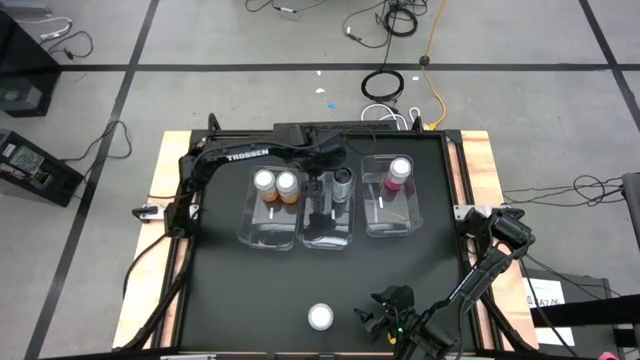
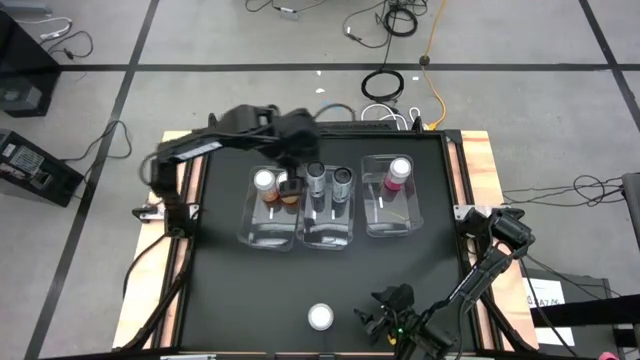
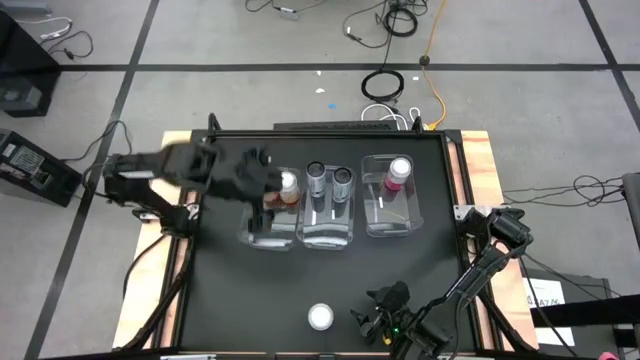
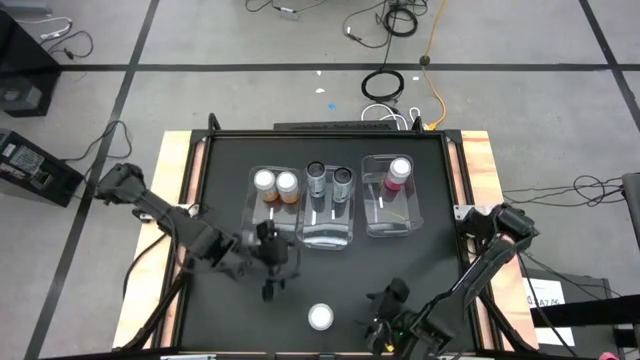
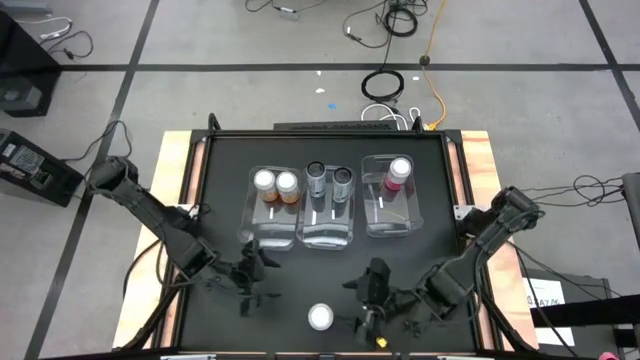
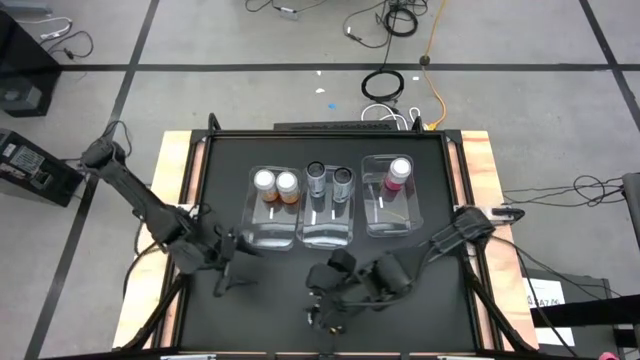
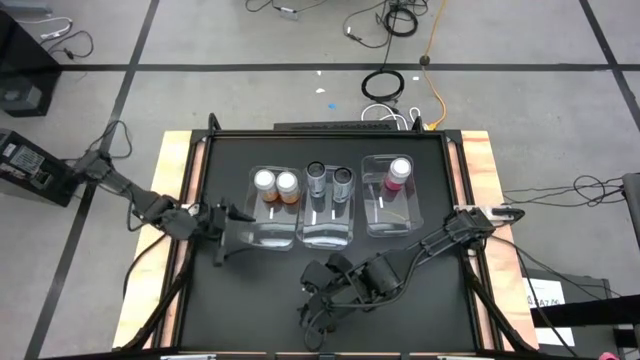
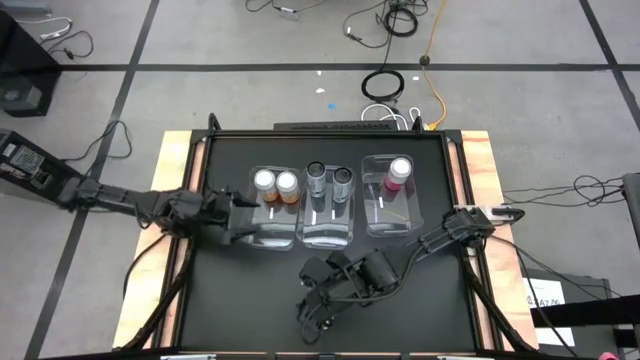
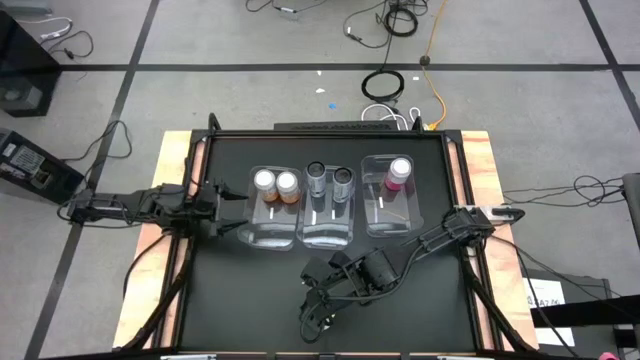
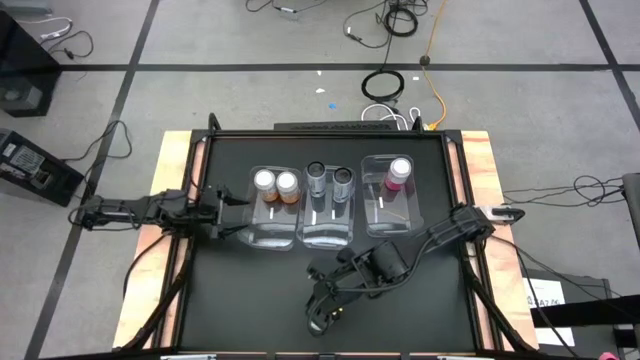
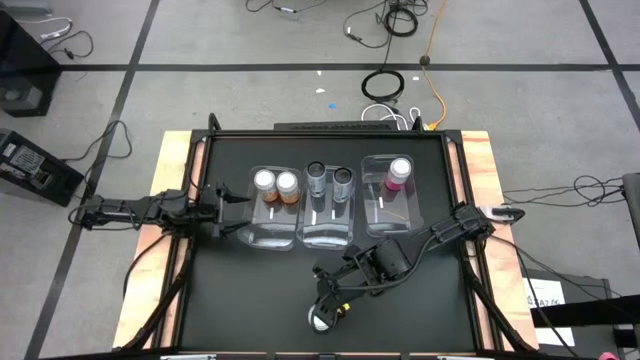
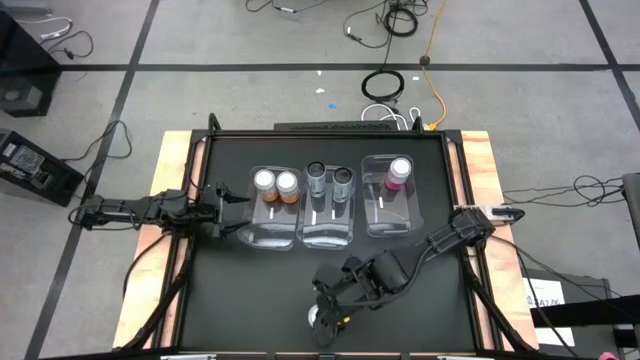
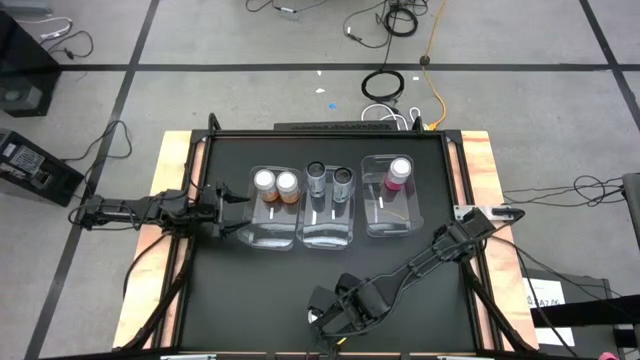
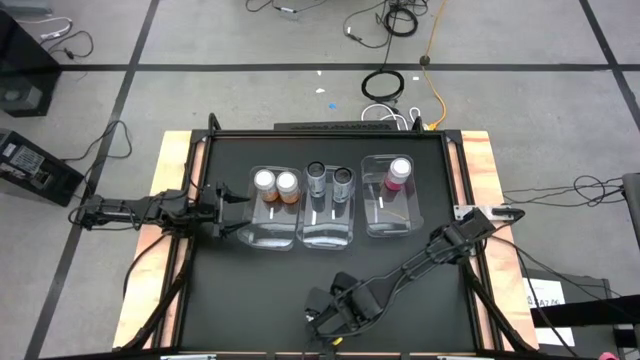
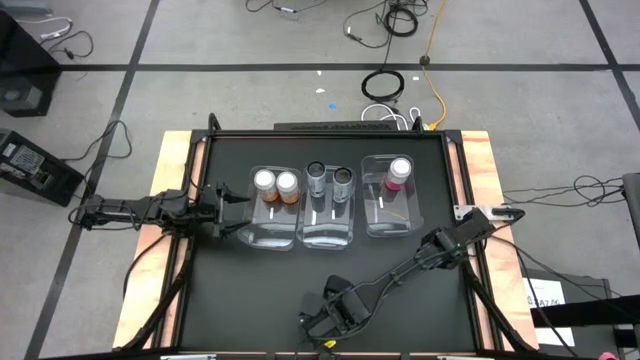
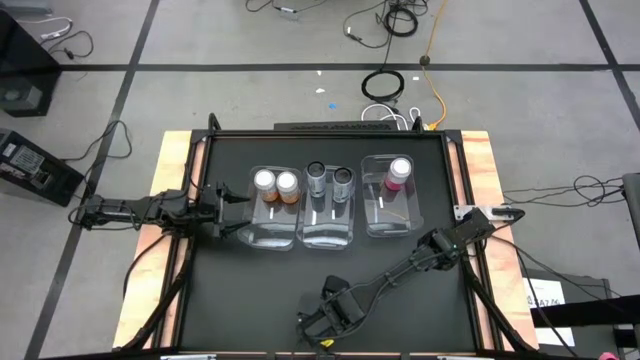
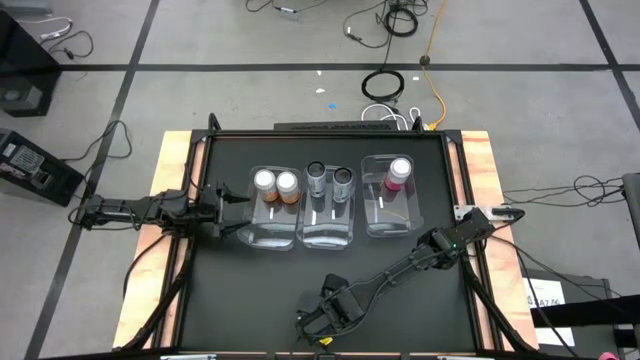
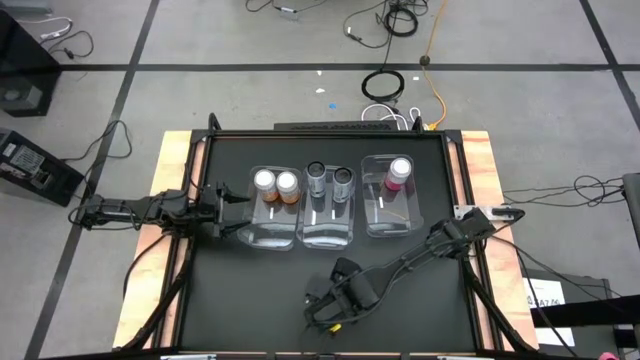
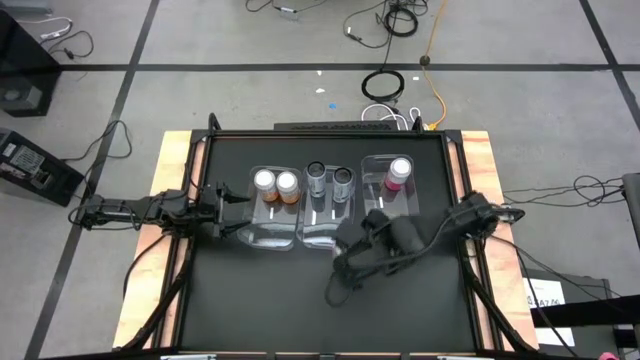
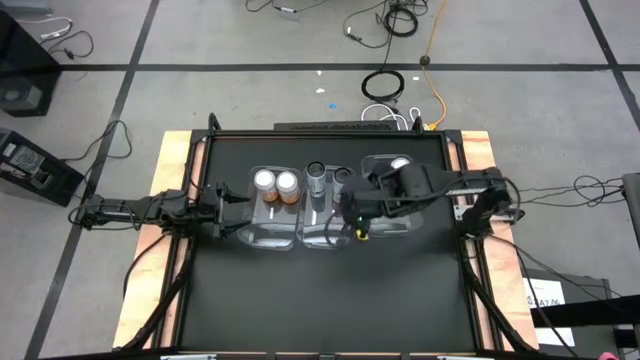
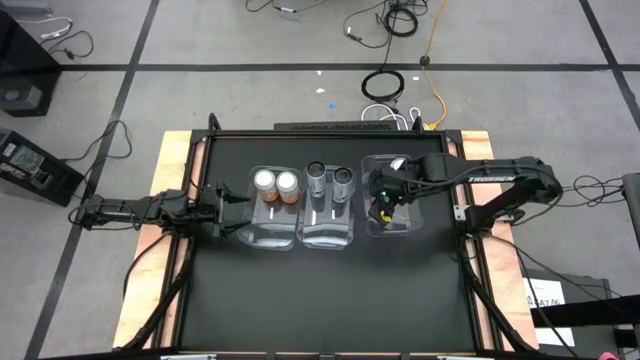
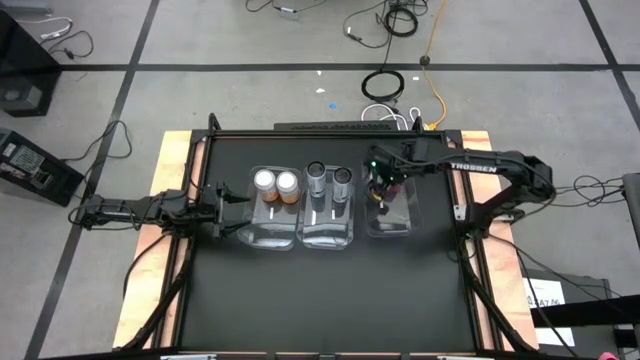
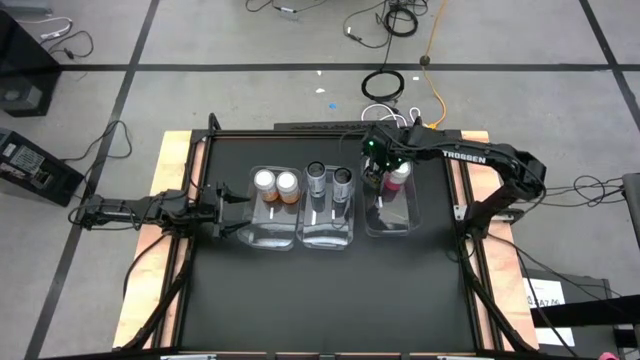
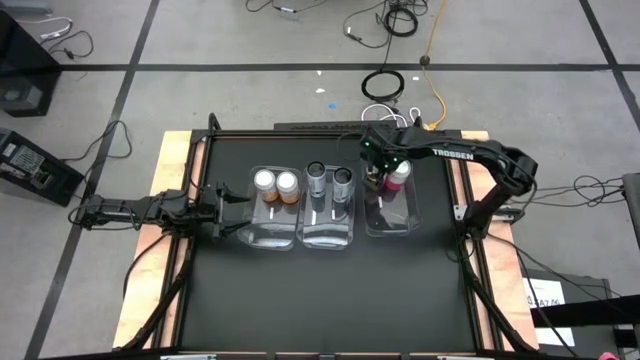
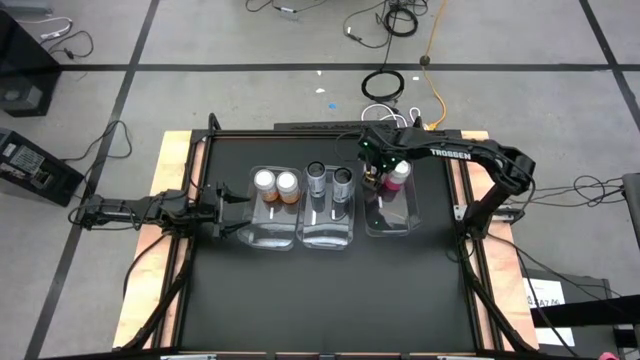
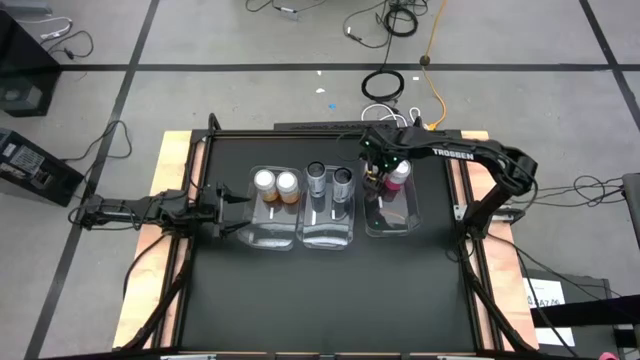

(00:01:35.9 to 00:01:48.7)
Task: Sort soda cans
Put the left pink/white soda can into the right transparent bin

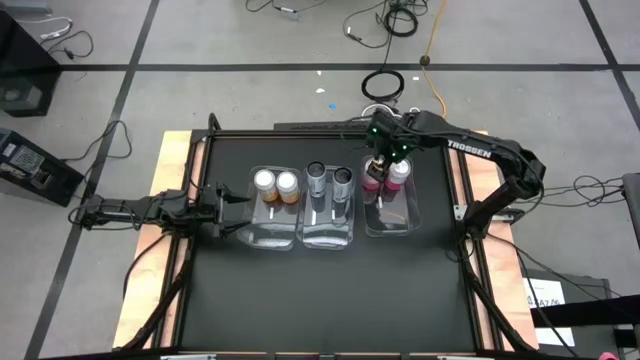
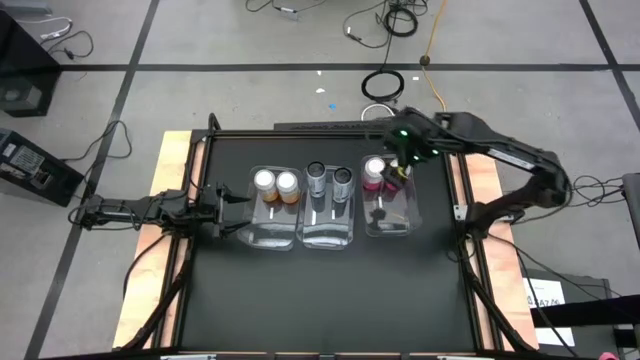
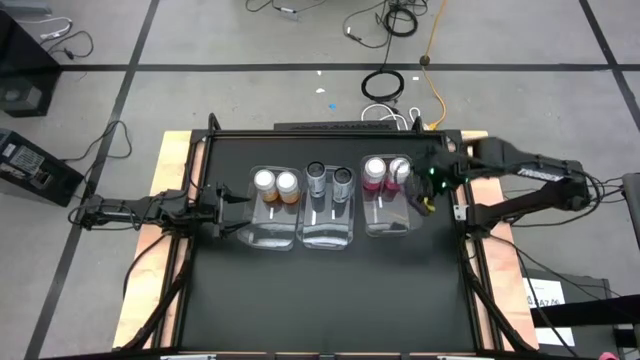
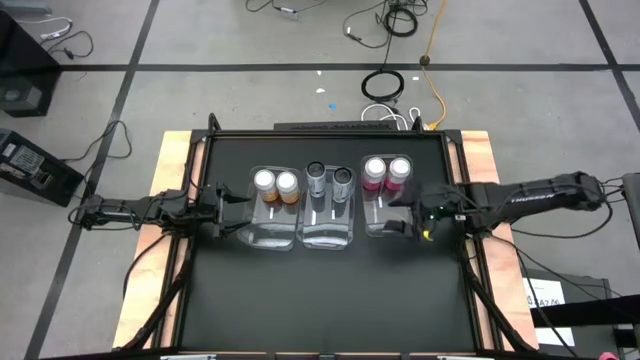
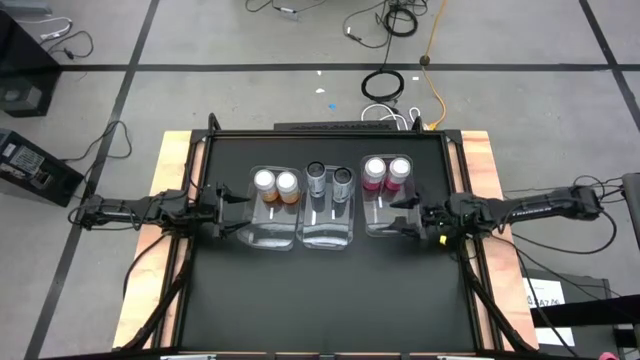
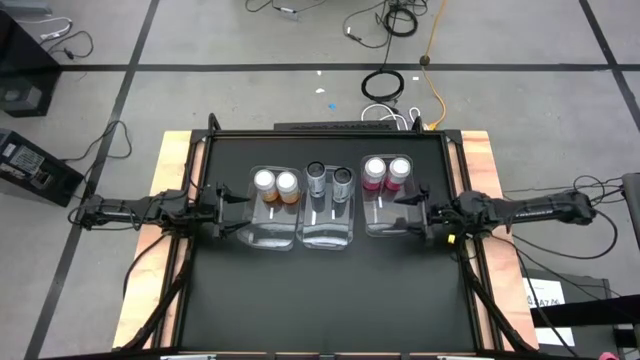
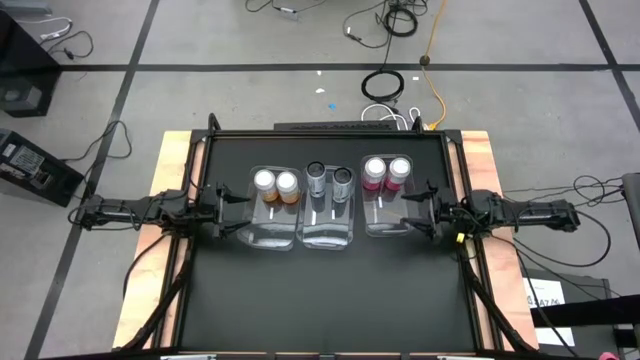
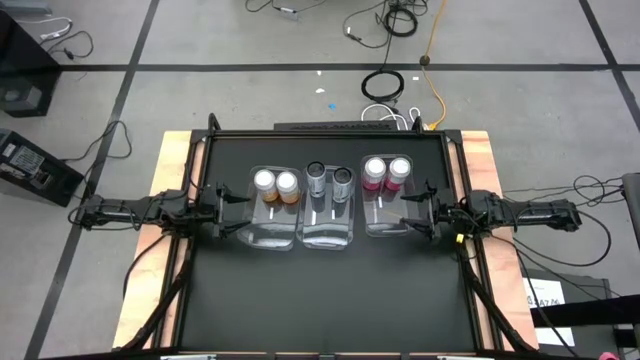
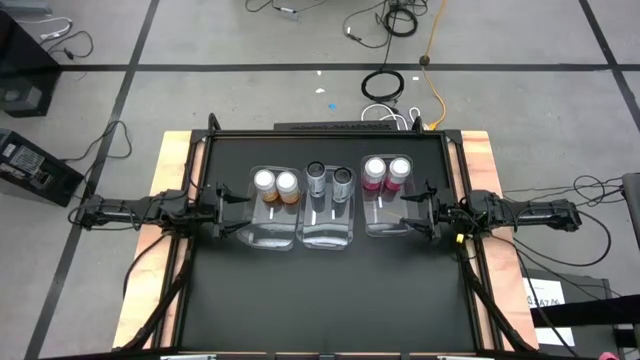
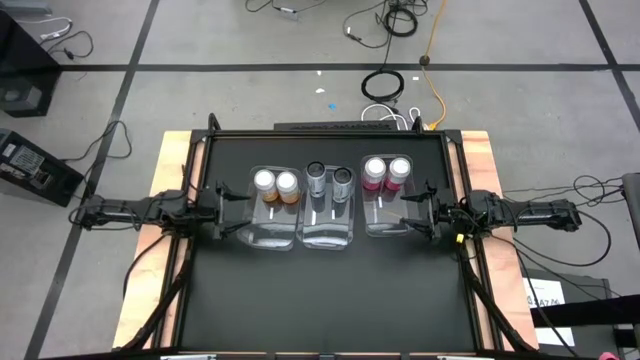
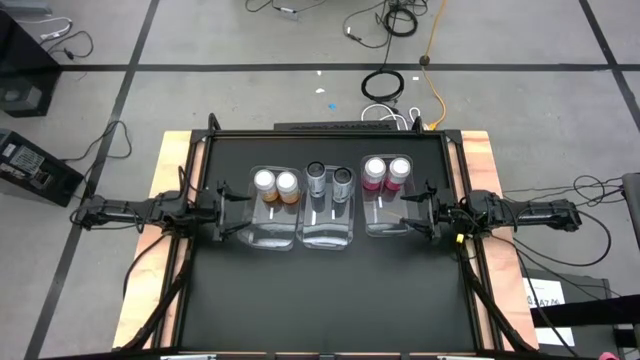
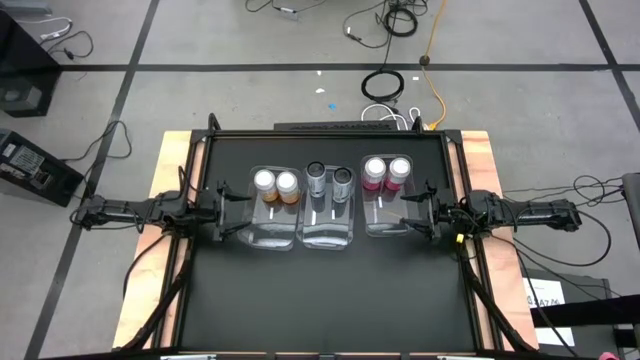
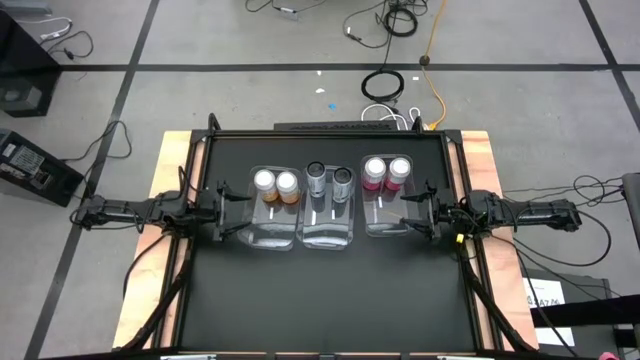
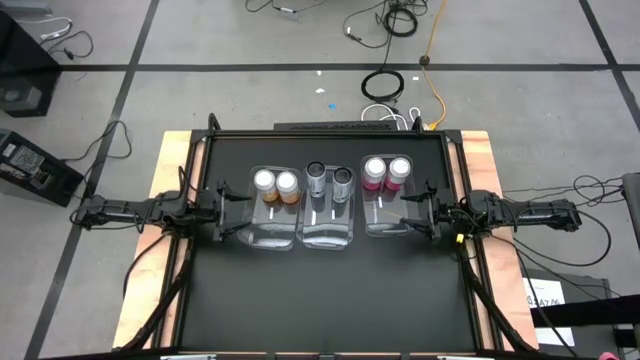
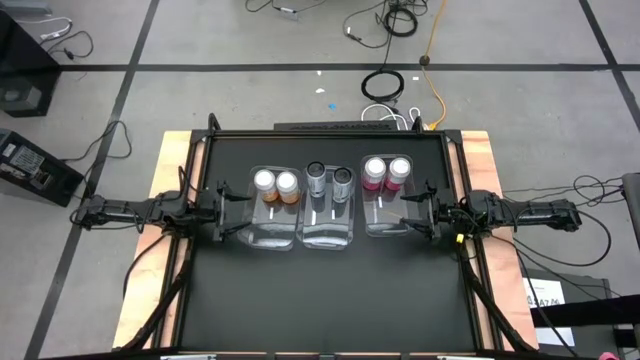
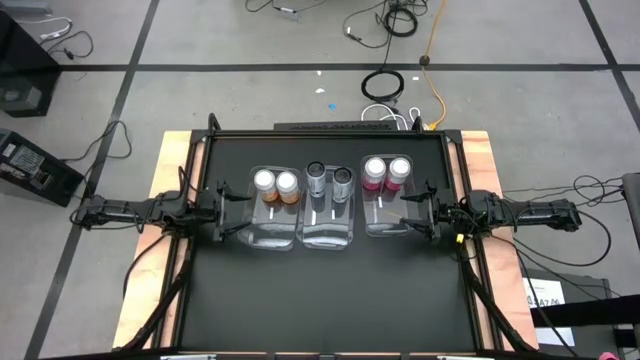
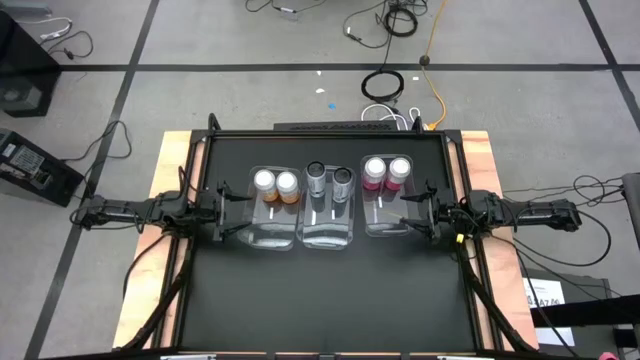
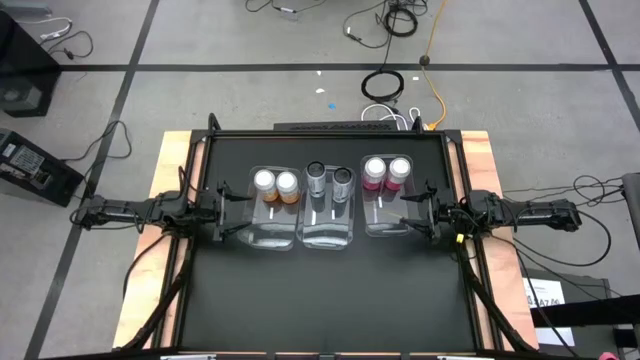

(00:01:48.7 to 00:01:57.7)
Return to Home Position
